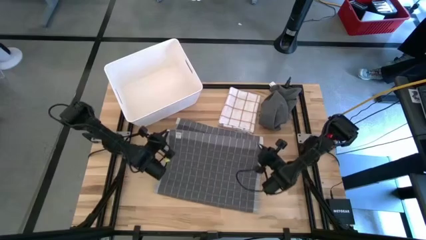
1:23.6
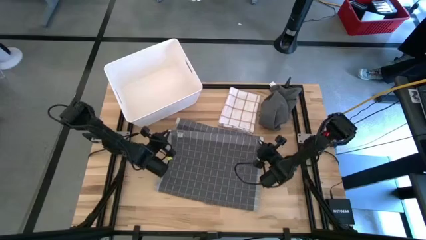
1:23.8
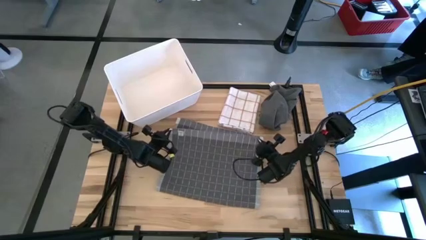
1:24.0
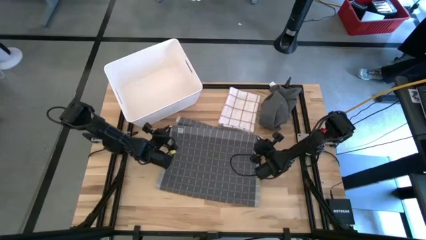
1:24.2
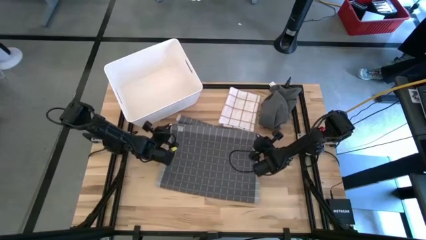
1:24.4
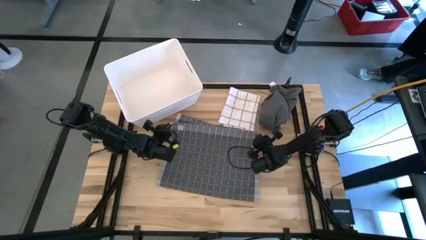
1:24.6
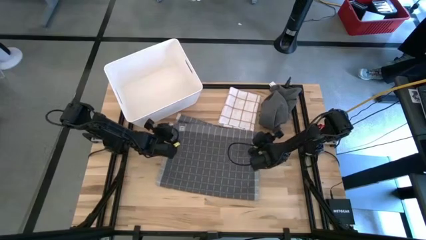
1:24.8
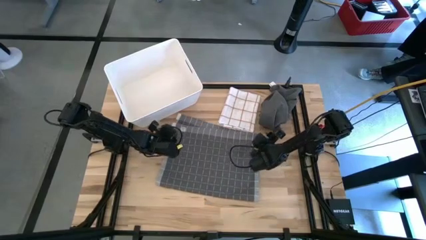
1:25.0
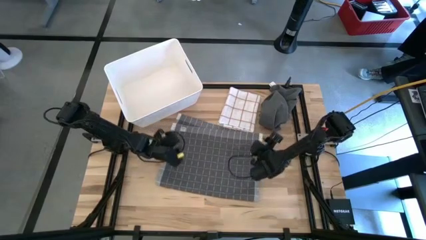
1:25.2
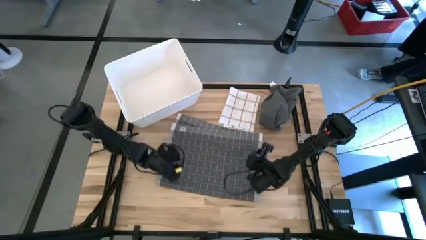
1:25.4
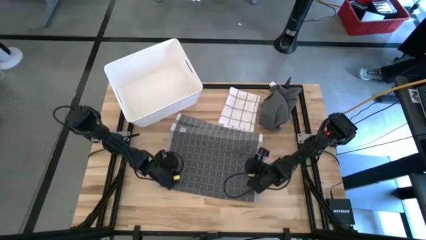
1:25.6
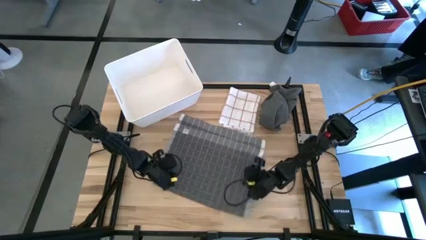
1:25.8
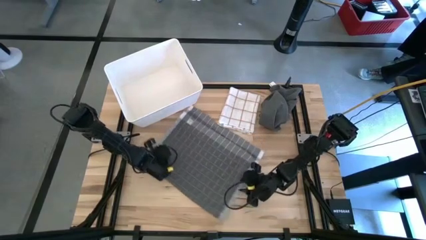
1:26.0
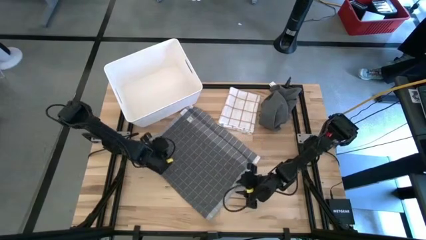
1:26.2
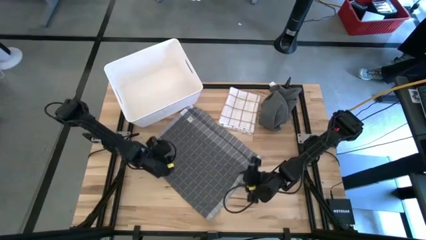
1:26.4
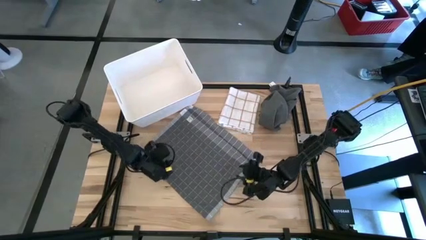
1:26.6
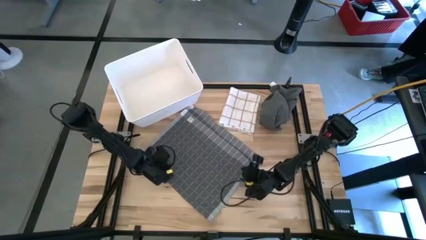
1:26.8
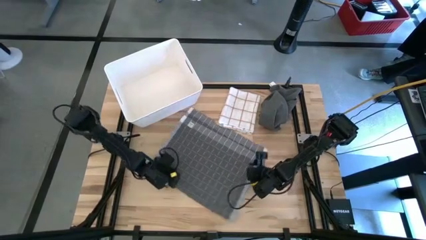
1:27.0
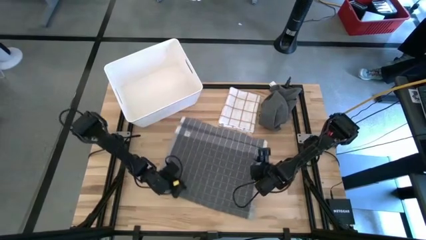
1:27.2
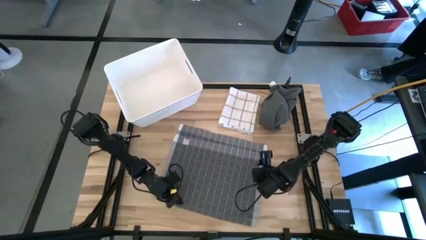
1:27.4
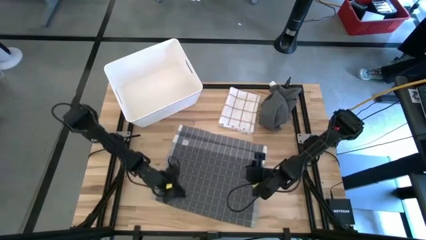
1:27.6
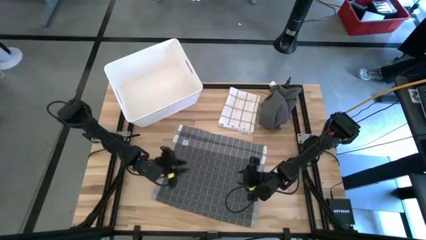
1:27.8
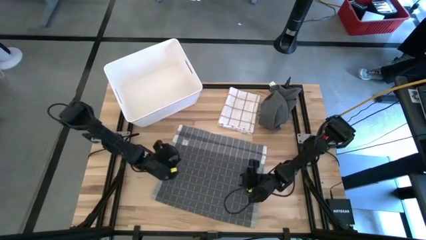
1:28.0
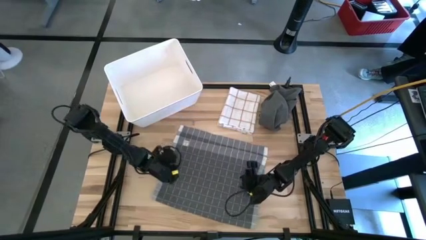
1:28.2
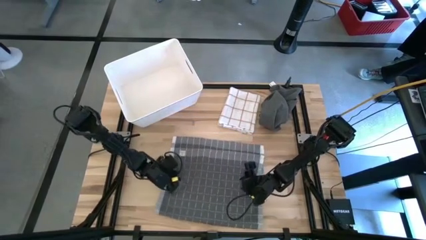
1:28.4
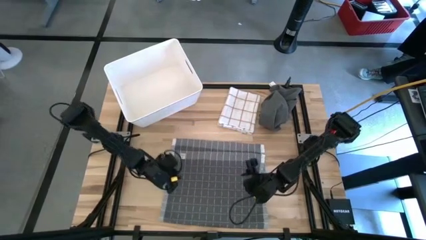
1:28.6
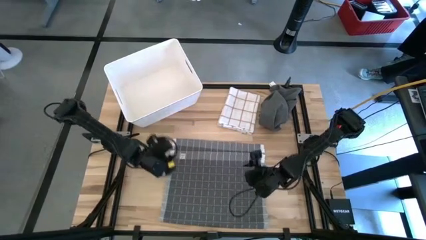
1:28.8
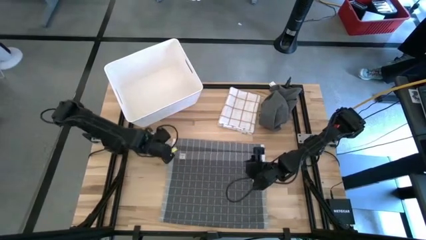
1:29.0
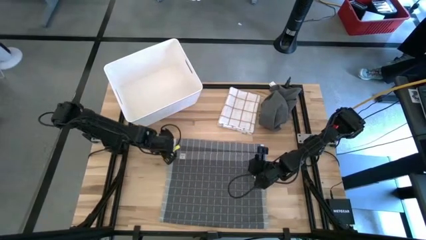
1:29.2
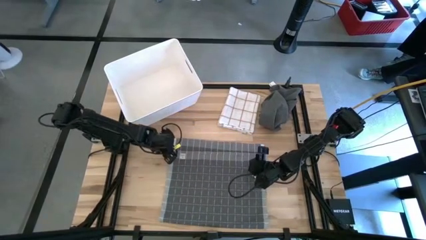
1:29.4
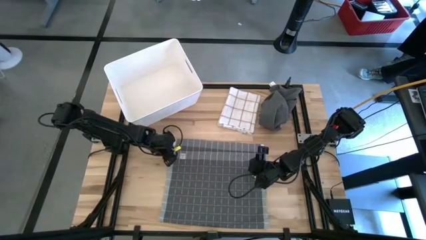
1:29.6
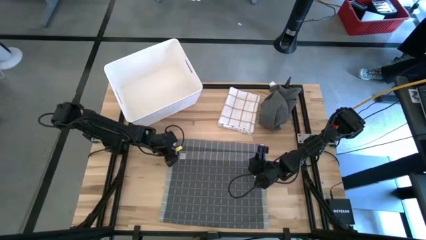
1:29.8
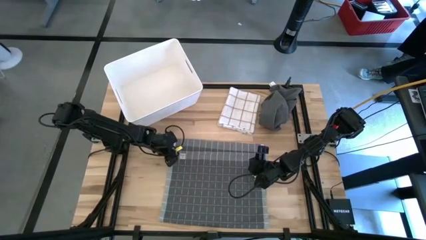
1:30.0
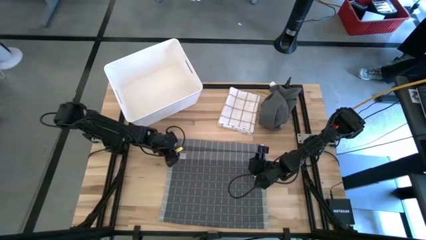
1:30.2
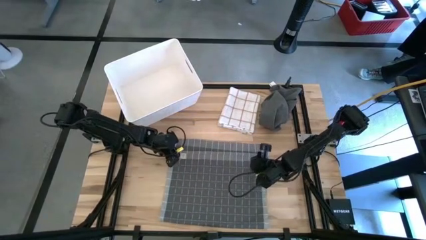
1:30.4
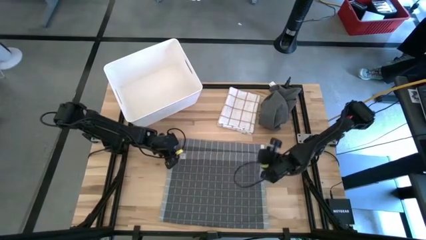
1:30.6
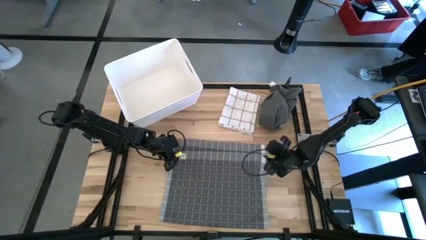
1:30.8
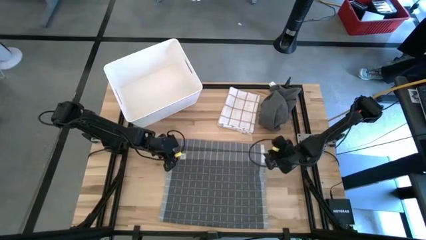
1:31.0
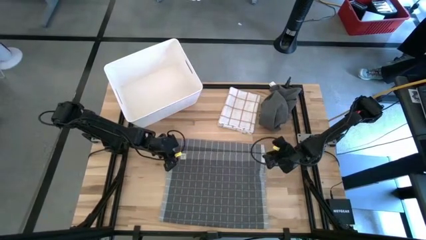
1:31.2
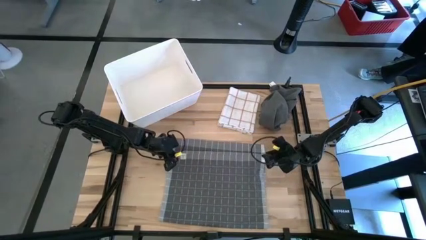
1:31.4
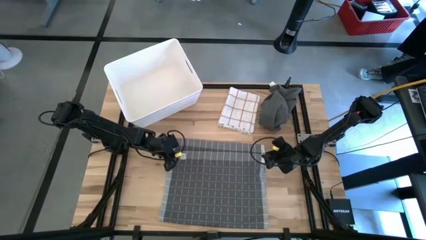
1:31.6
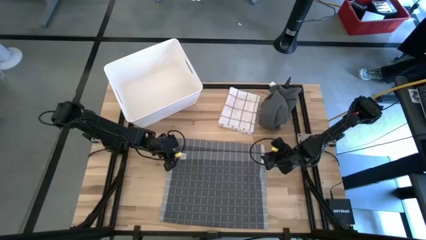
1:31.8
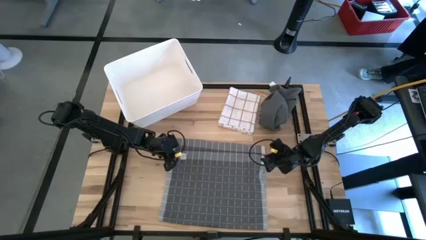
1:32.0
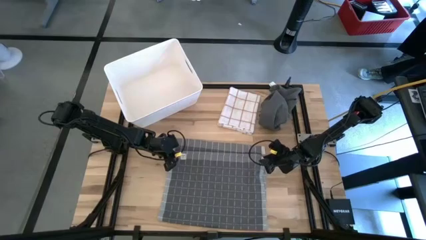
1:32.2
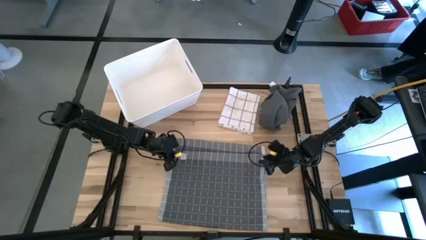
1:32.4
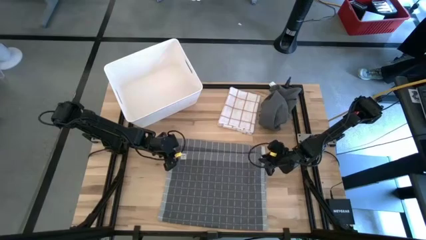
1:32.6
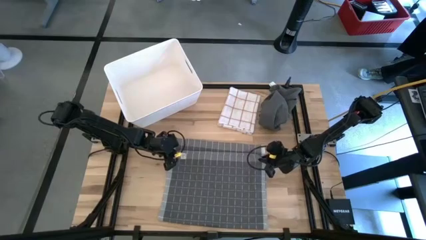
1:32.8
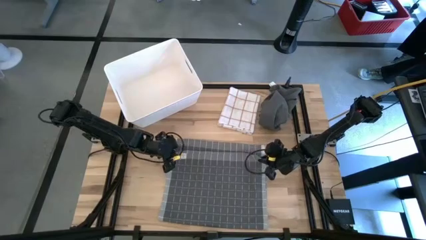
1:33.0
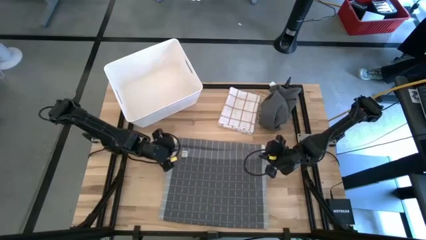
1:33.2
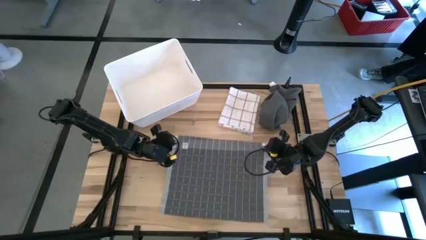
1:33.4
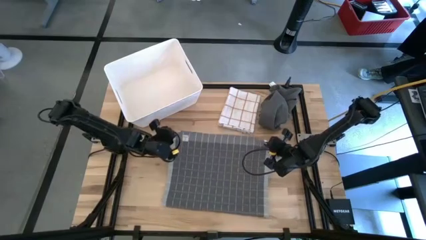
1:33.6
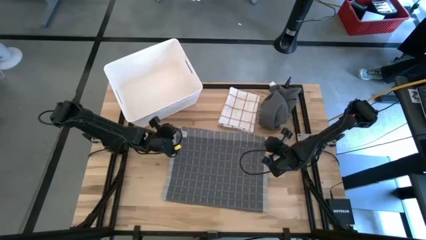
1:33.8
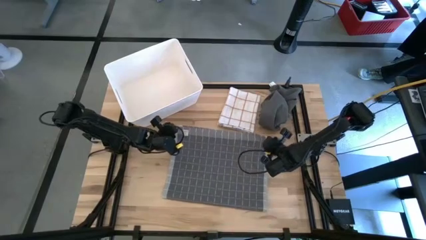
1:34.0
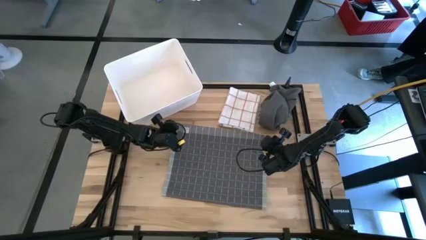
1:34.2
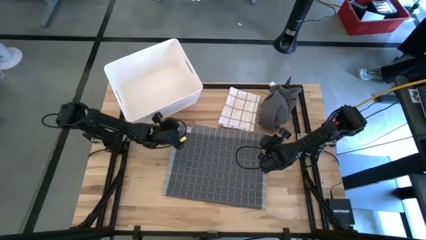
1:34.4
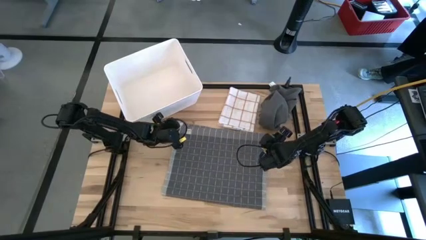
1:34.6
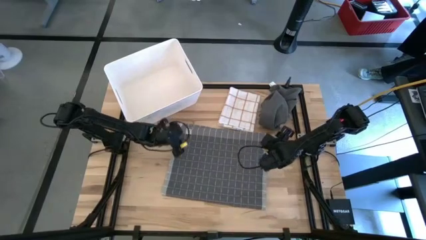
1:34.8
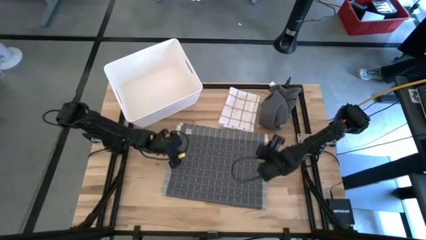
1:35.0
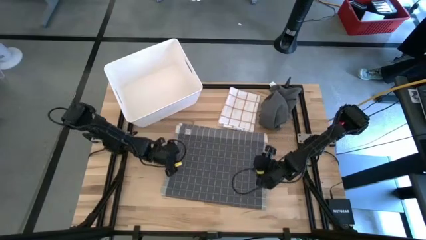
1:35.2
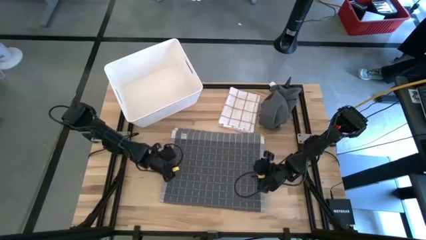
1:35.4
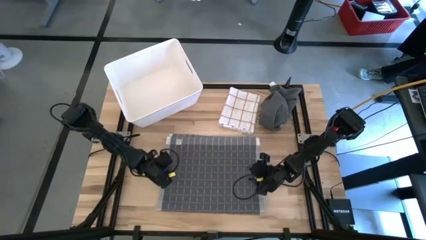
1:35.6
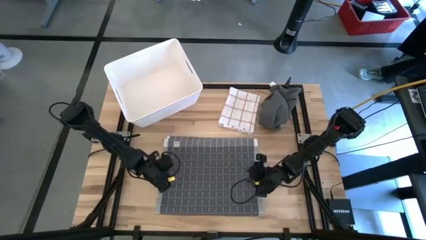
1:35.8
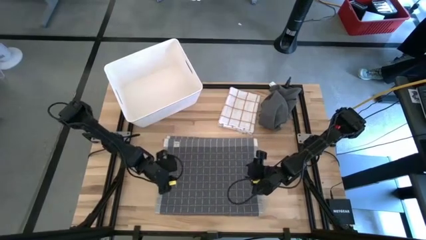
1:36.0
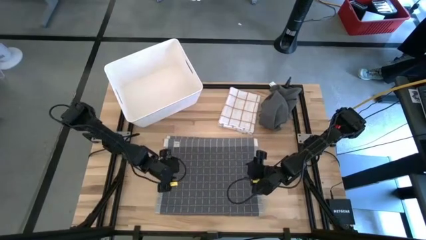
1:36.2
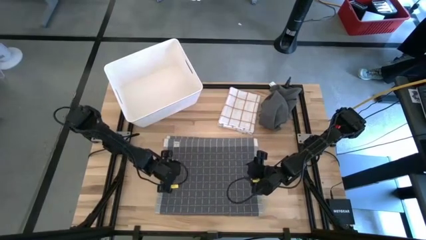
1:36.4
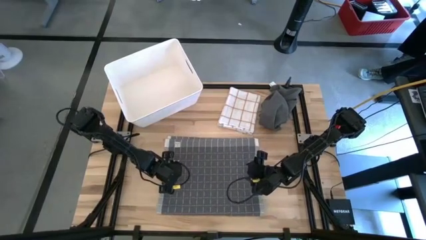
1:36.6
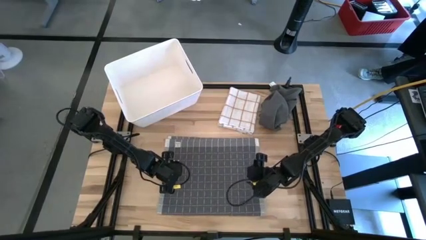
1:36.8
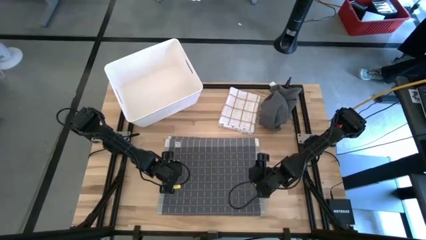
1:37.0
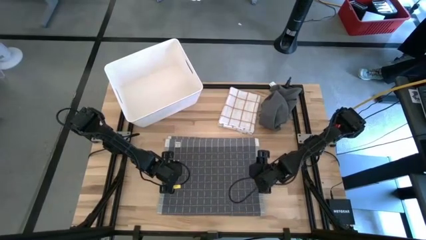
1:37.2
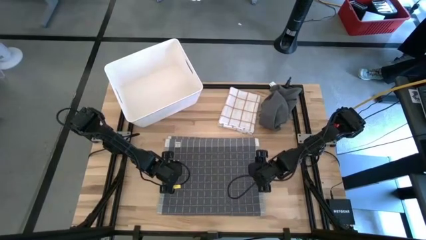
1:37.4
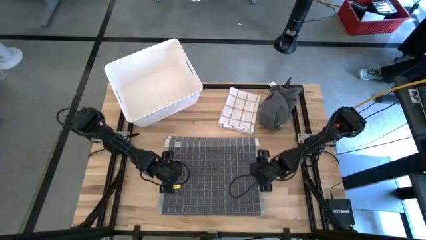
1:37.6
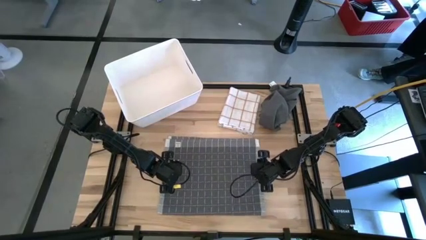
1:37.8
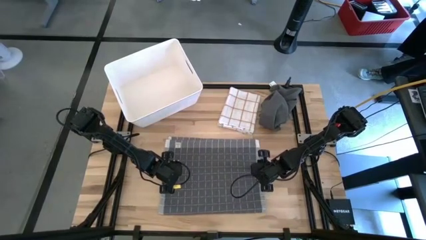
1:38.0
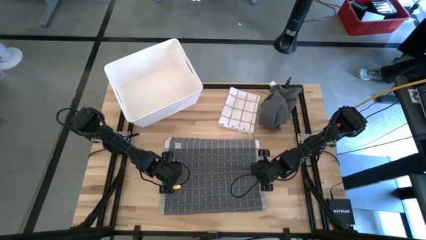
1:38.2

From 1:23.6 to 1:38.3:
Task: Fold towel
Fold the gray checkered towel

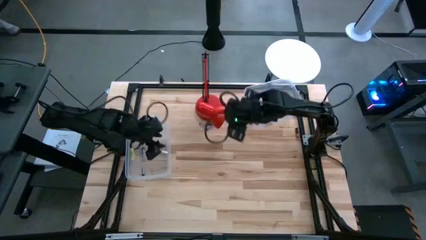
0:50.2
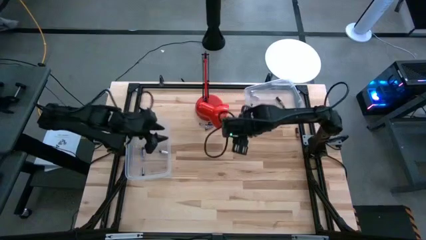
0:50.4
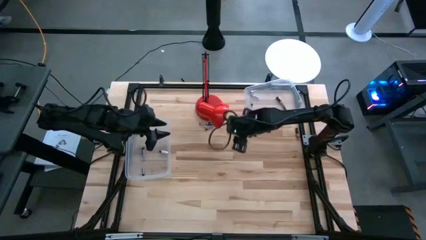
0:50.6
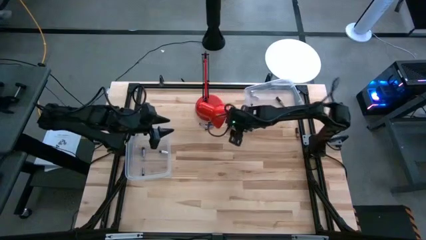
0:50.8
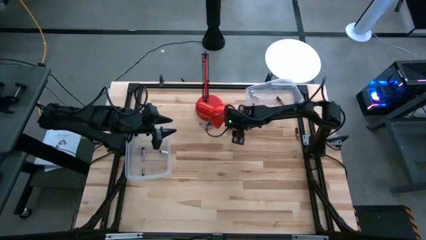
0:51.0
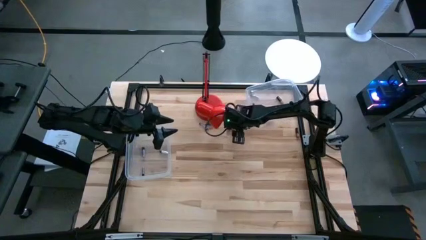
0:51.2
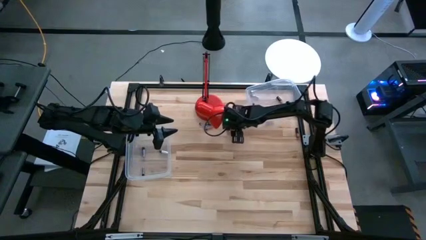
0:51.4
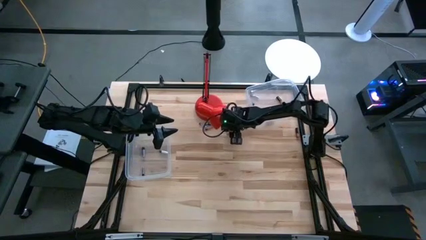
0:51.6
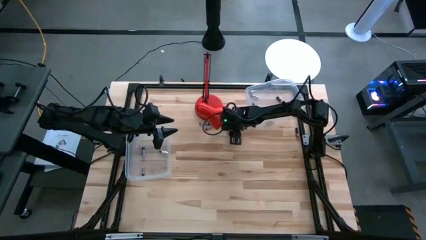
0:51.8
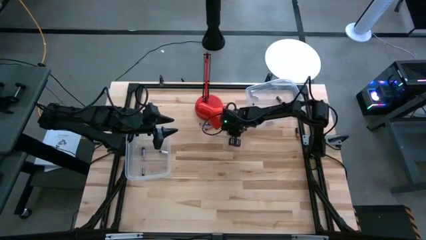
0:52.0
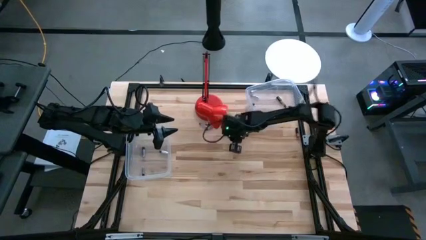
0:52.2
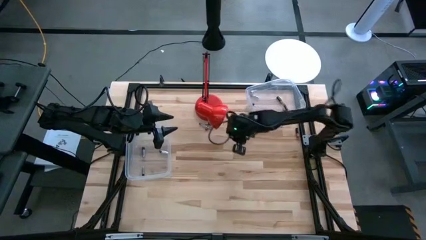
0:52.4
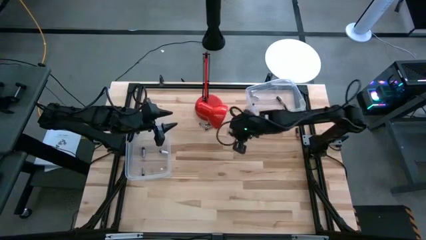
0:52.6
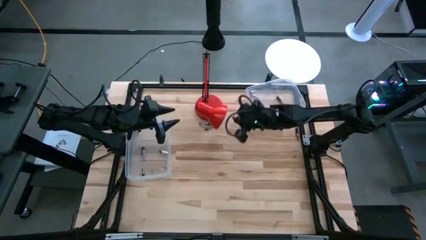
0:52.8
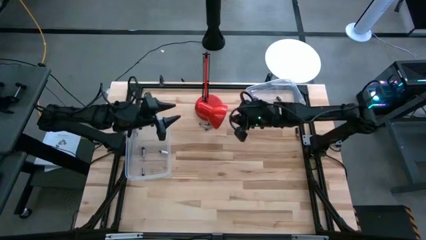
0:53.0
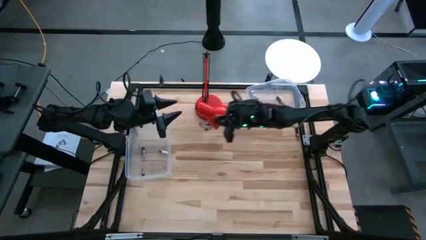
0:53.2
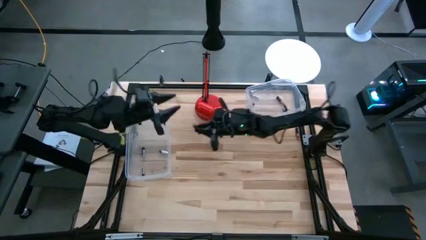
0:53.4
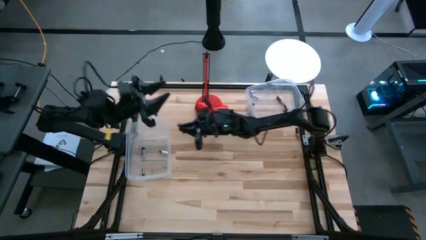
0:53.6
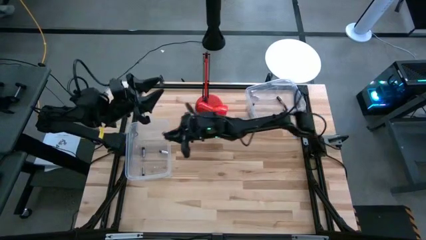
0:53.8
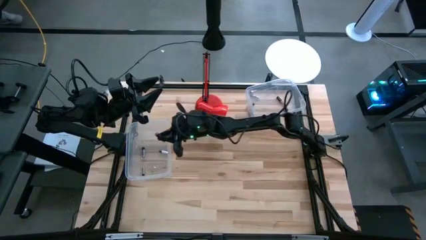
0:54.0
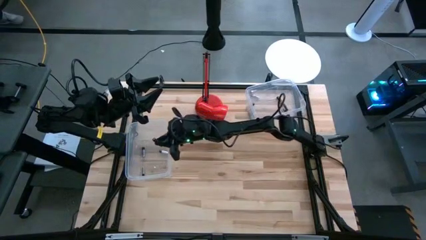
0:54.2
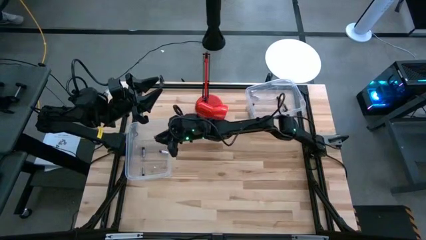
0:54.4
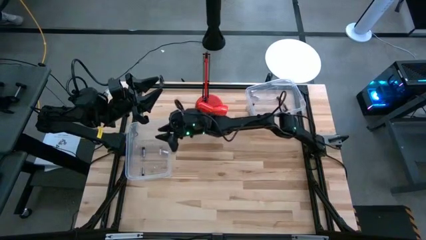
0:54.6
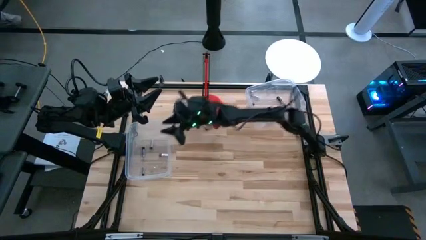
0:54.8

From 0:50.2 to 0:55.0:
Task: Sort batteries
Put the silver battery into the bottom transparent bin
